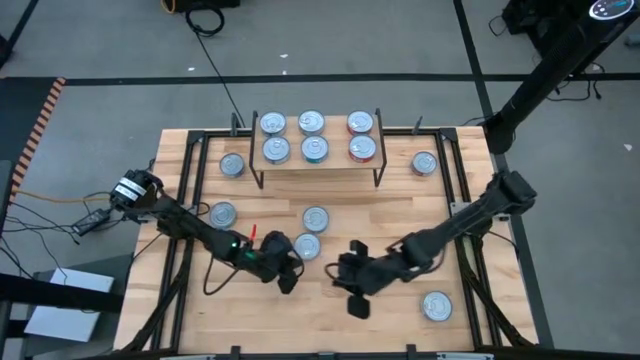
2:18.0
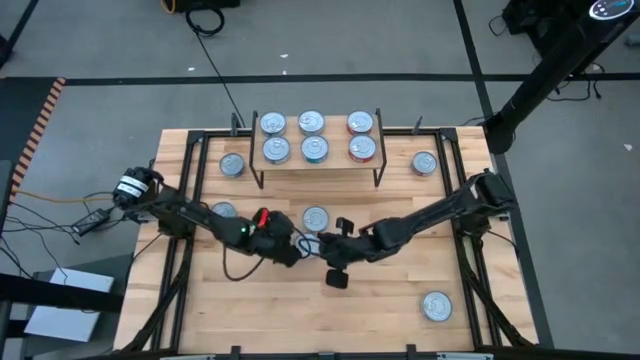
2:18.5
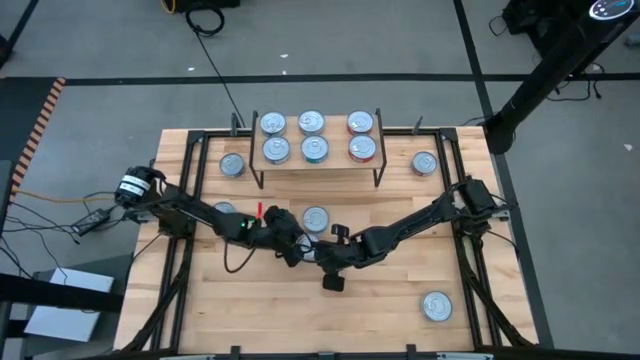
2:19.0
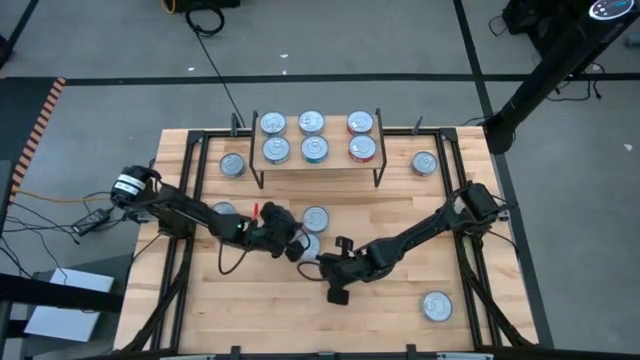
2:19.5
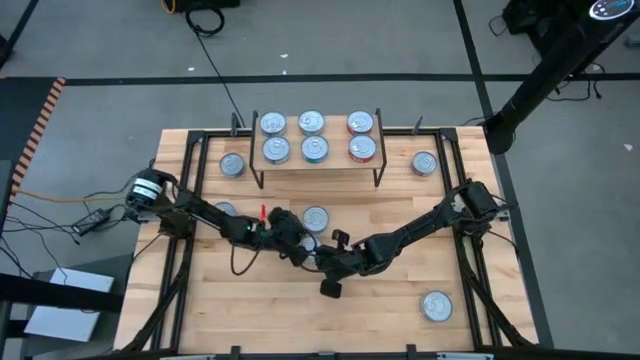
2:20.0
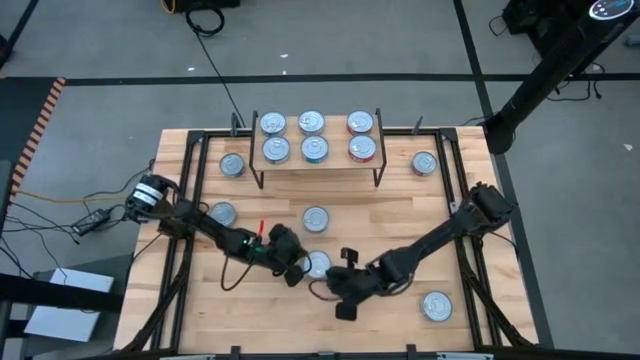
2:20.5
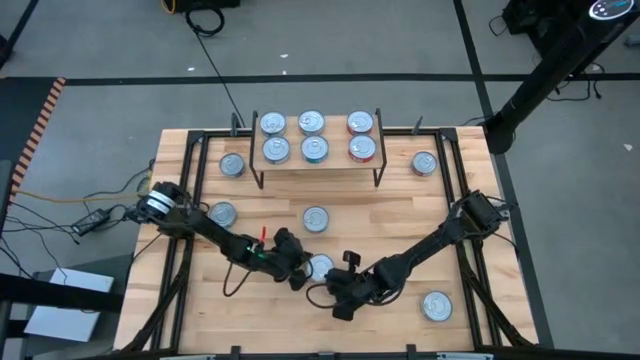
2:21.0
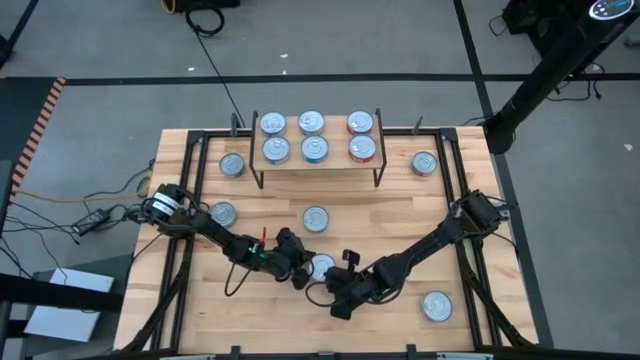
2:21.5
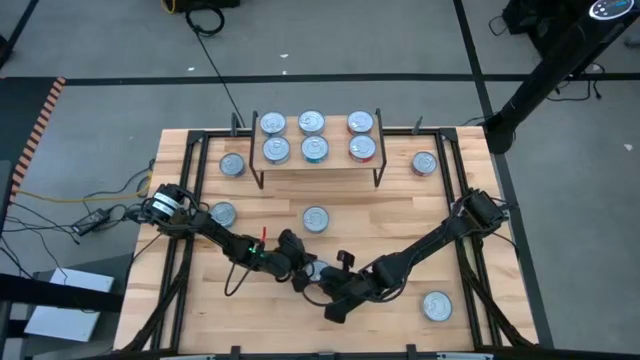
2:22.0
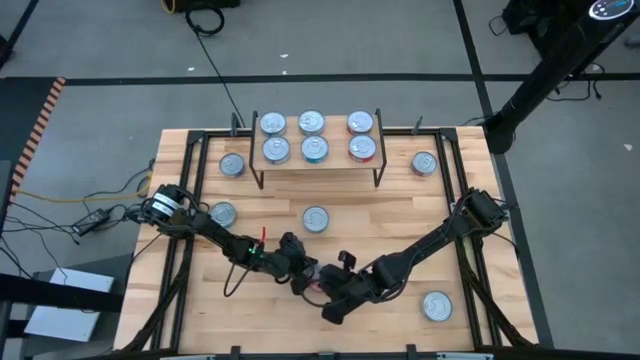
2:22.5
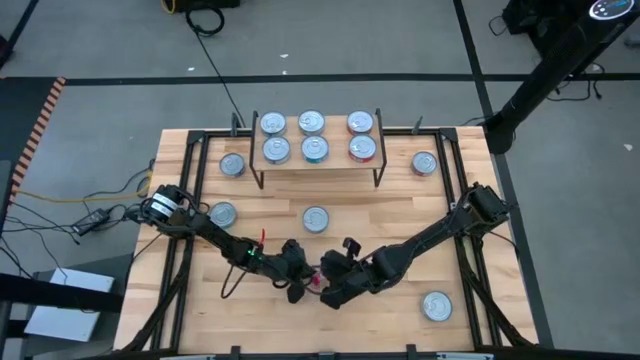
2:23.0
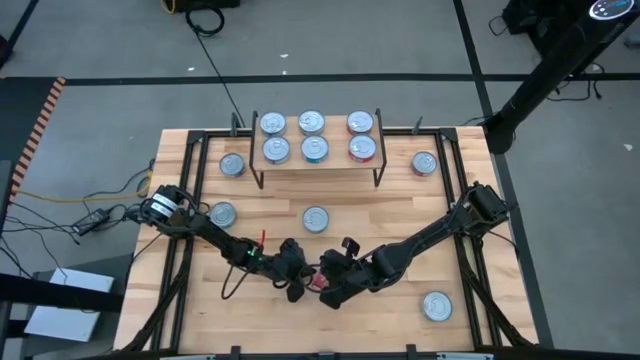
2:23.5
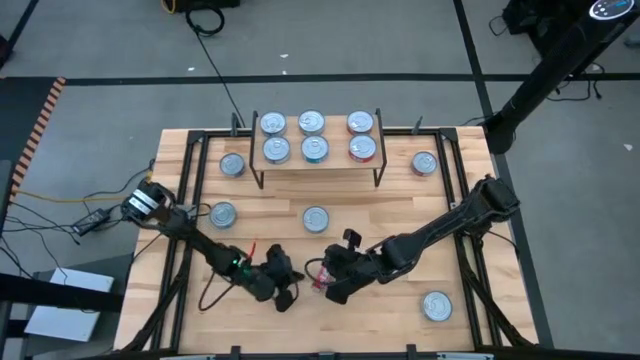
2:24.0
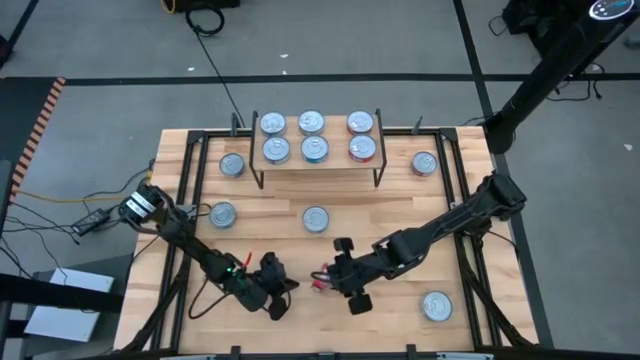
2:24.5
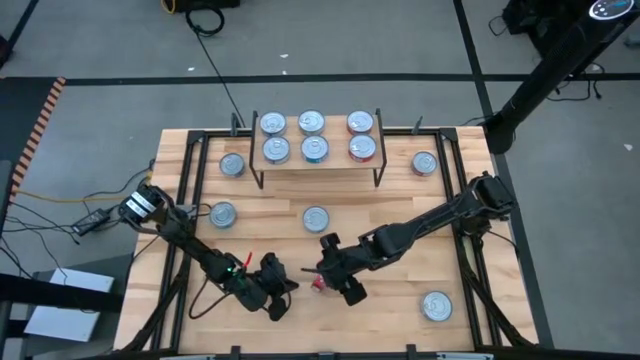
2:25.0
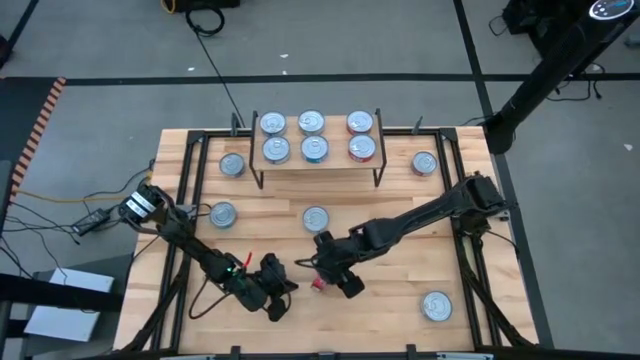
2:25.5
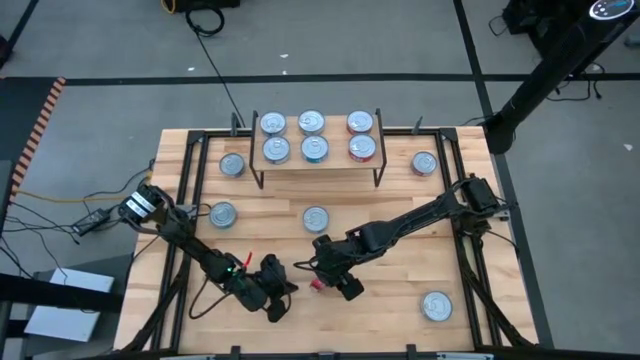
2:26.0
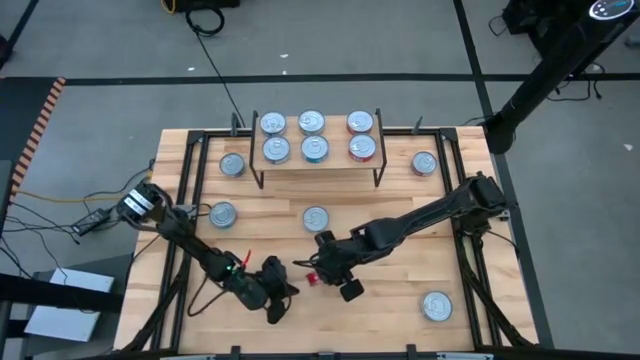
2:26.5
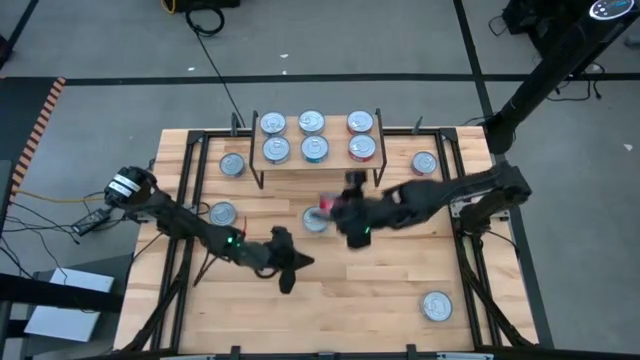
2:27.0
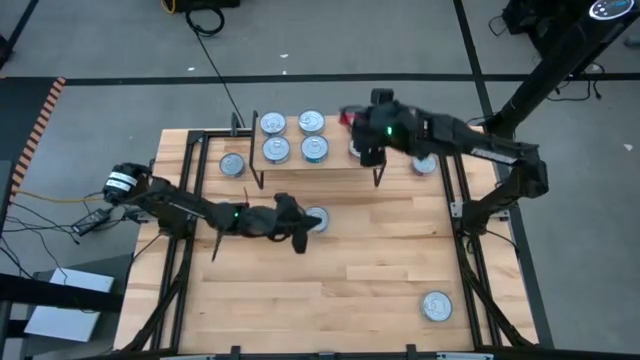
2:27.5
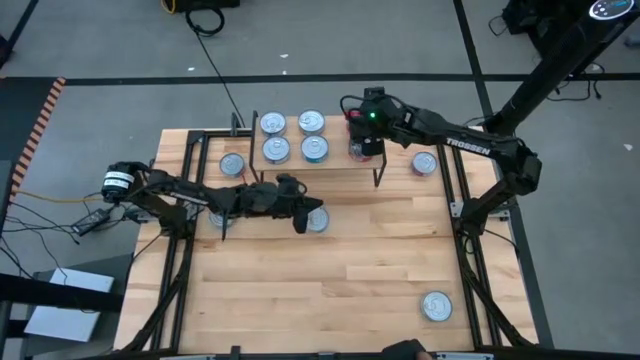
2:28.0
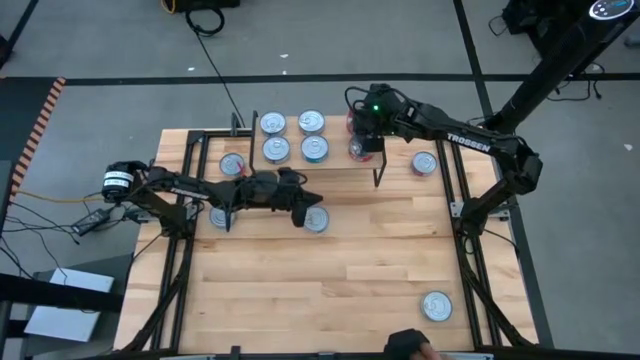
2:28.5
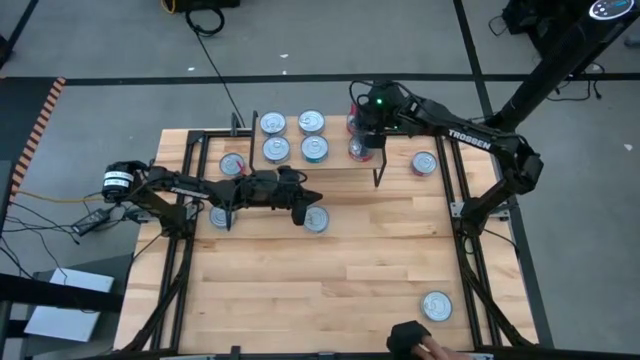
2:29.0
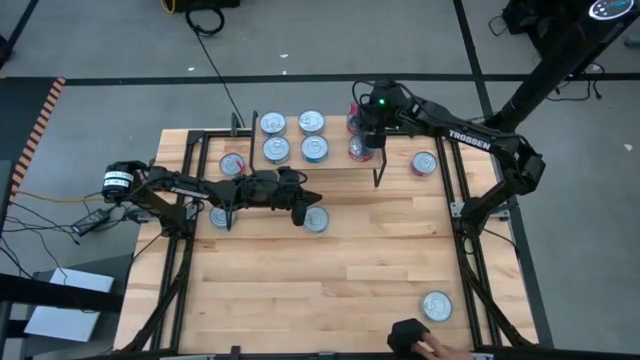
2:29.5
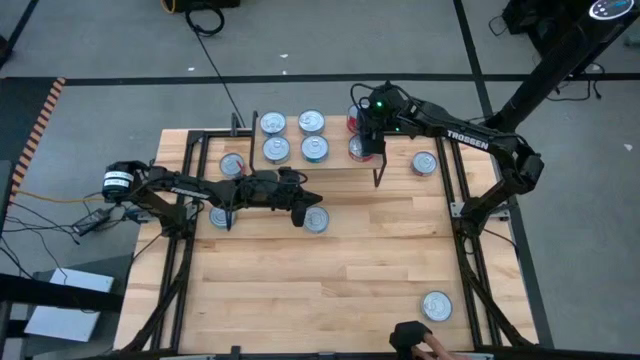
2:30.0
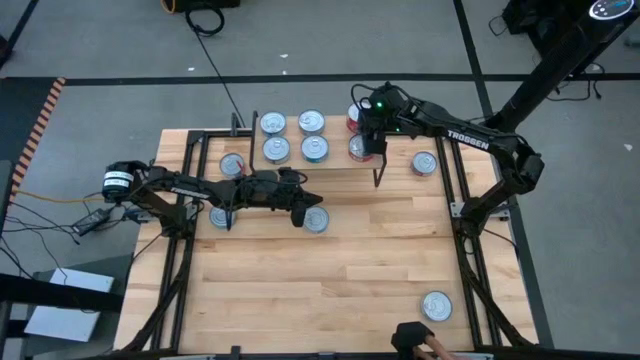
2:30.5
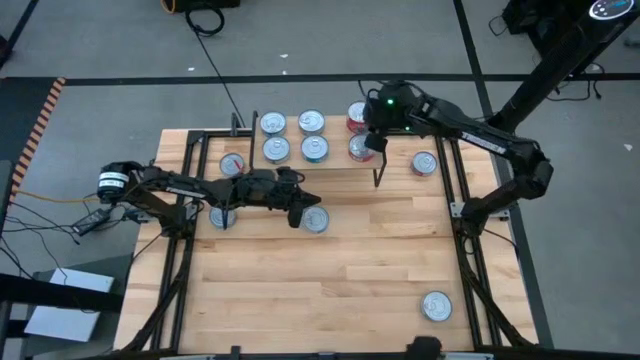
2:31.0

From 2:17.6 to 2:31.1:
Task: Stack canned seafood by type on shelf
Stack the red tuna can on top of the other red tuna can on the shelf

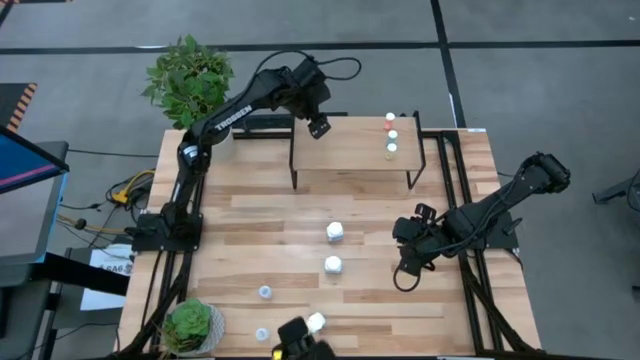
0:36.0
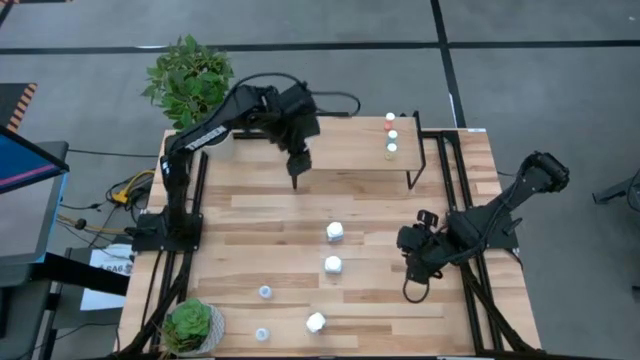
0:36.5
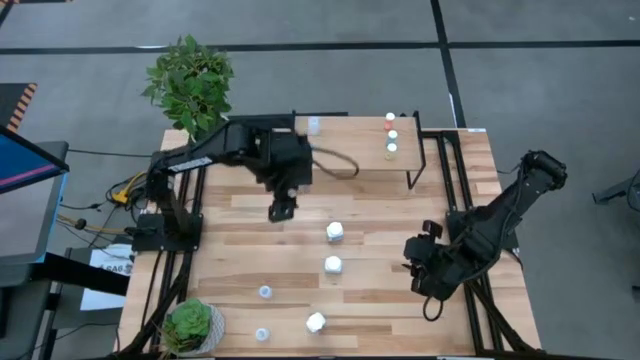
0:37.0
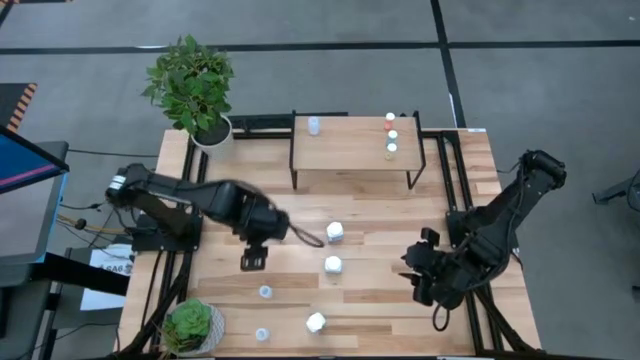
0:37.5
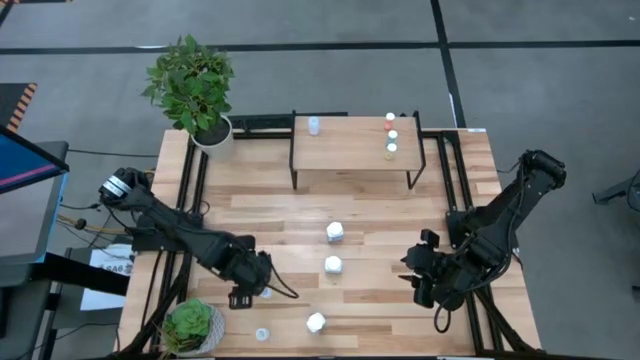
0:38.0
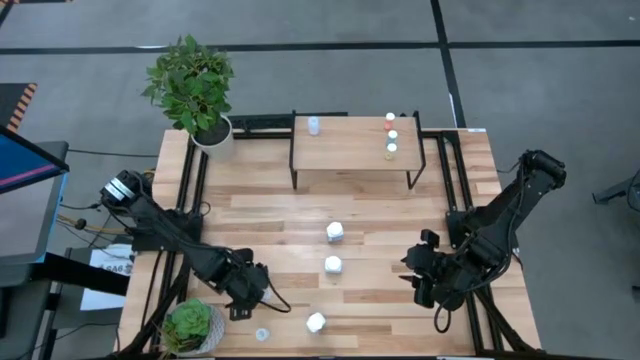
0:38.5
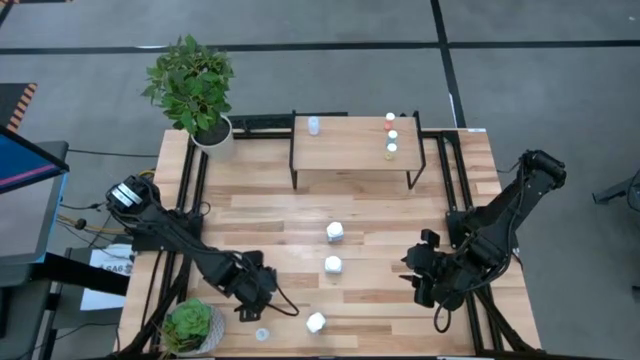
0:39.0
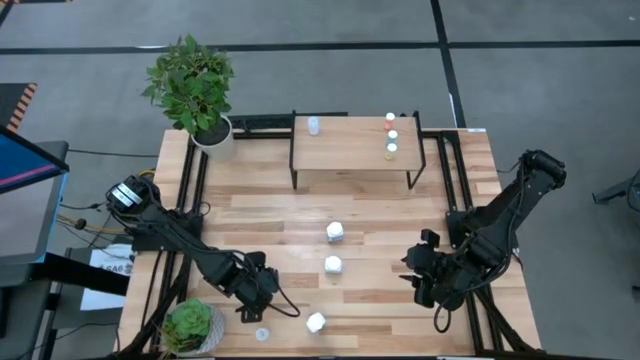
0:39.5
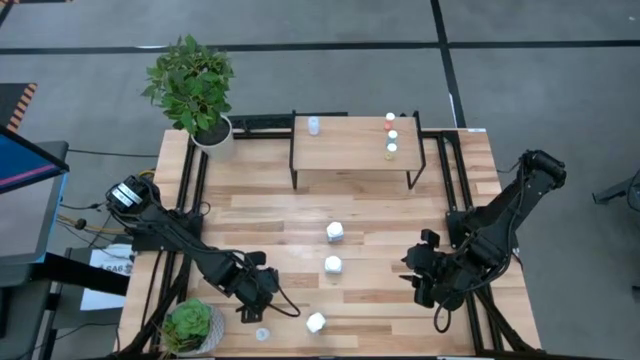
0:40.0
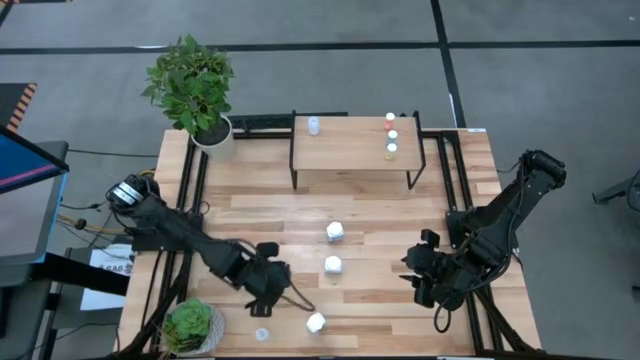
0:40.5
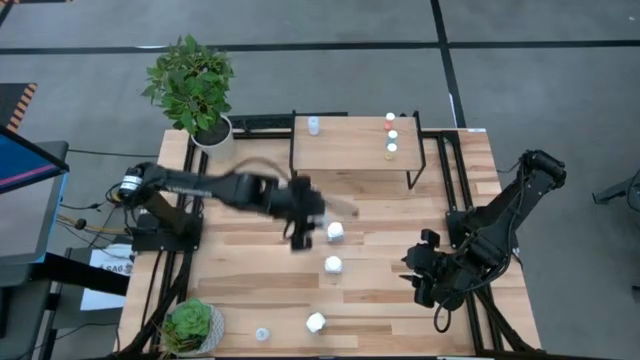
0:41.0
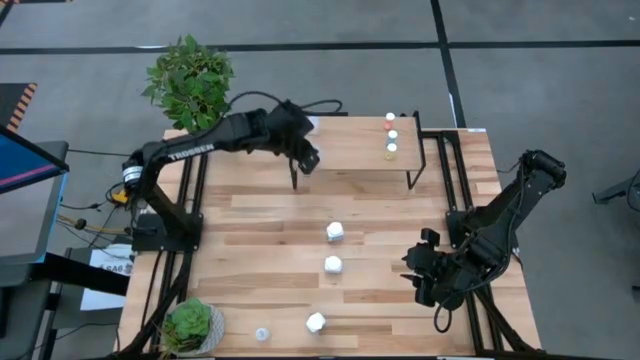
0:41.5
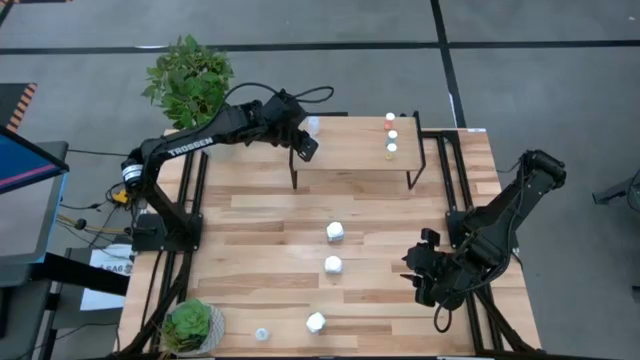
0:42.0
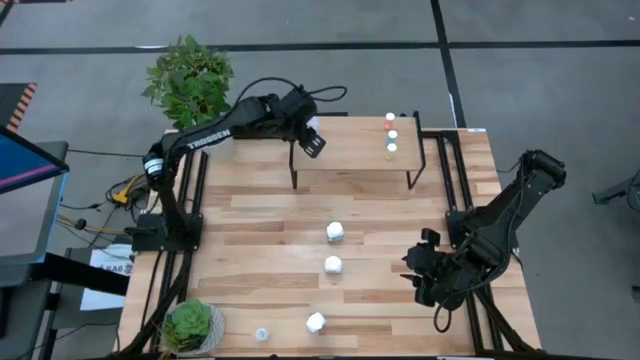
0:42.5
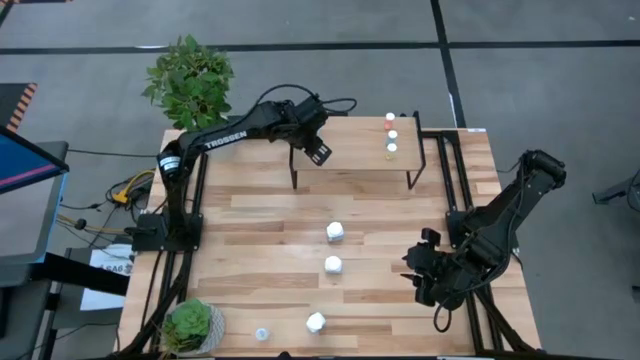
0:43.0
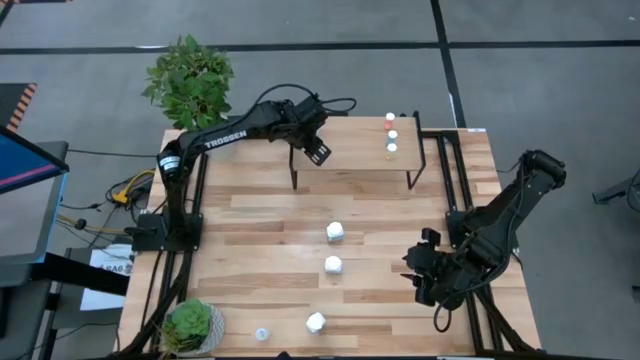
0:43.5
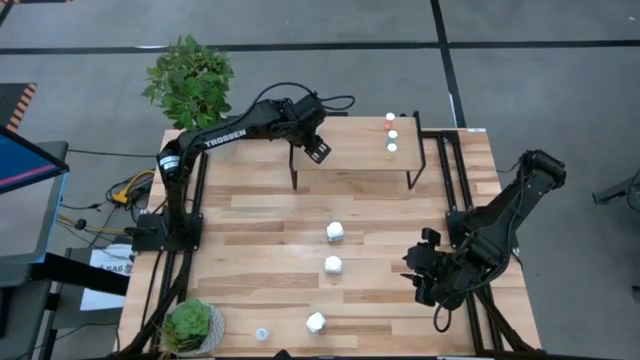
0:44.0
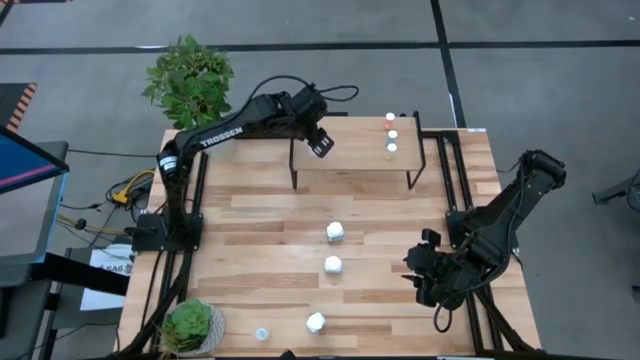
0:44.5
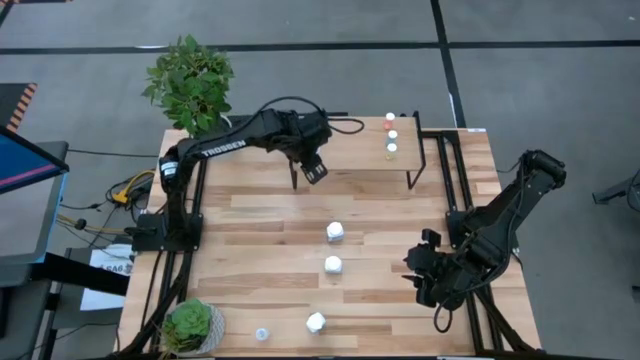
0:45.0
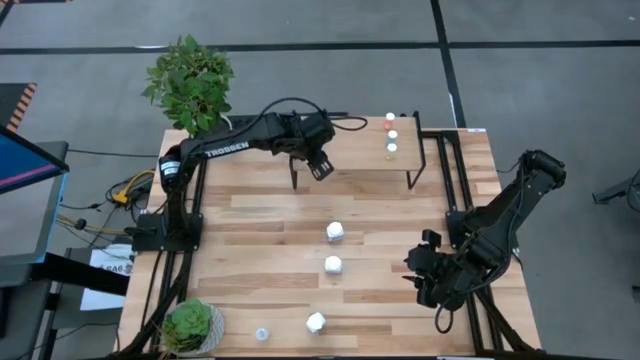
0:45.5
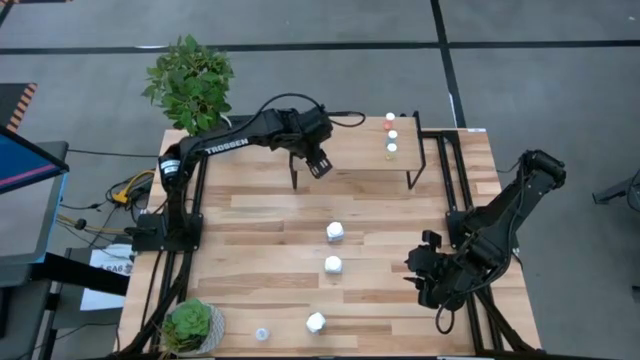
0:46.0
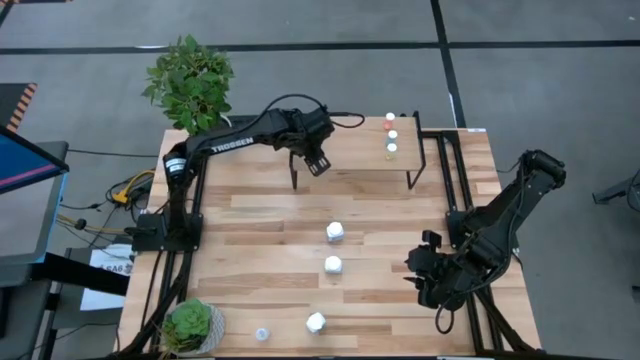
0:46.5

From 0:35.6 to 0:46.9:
Task: Pick and place medicine bottles onto shelf by color
Put the top transparent pill bottle on the shelf aligned with the other transparent pill bottle
